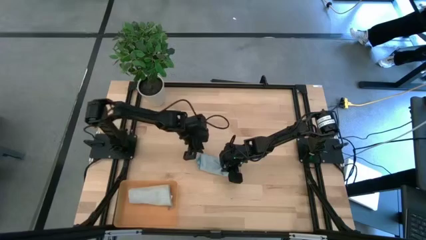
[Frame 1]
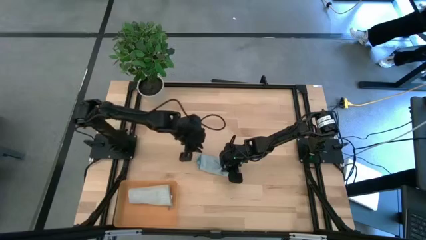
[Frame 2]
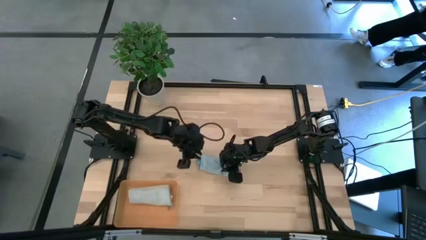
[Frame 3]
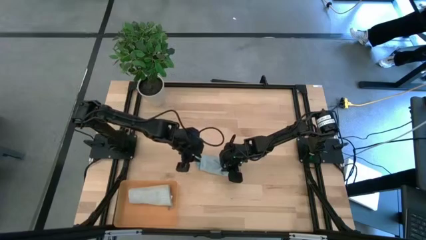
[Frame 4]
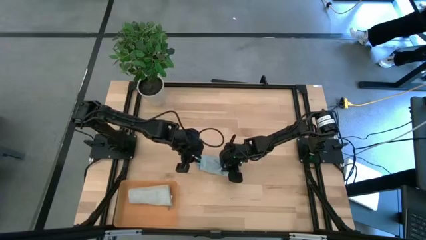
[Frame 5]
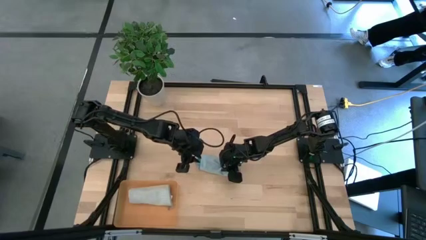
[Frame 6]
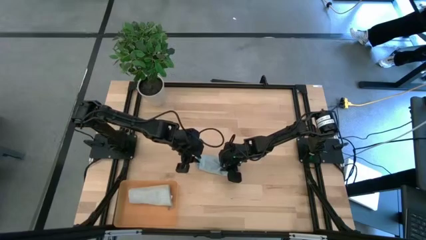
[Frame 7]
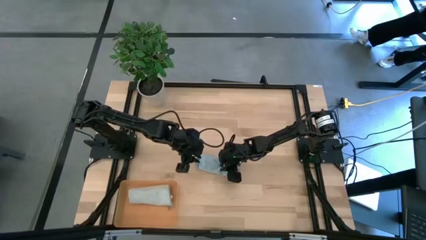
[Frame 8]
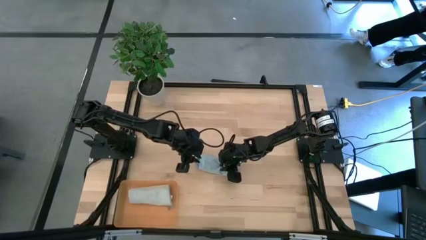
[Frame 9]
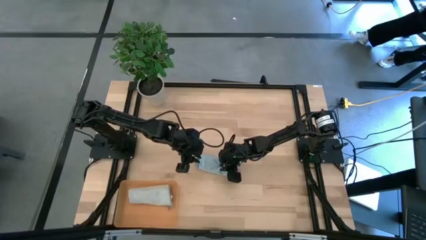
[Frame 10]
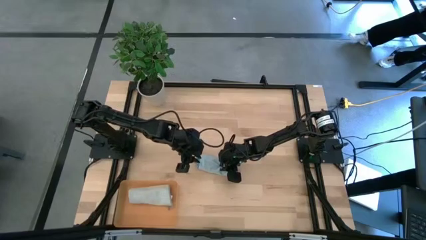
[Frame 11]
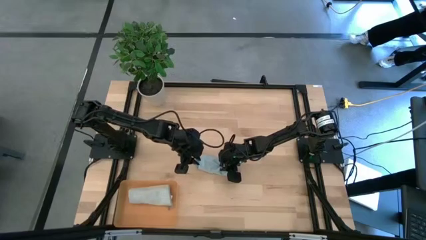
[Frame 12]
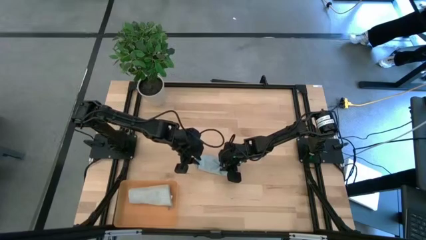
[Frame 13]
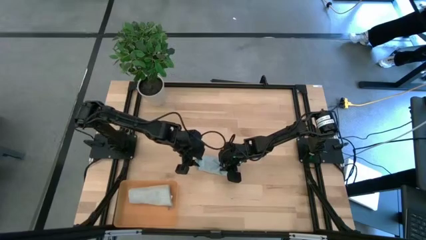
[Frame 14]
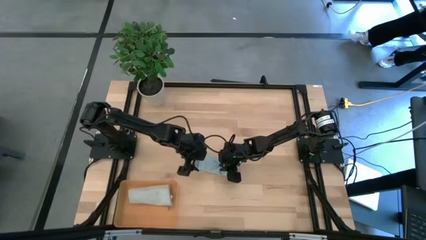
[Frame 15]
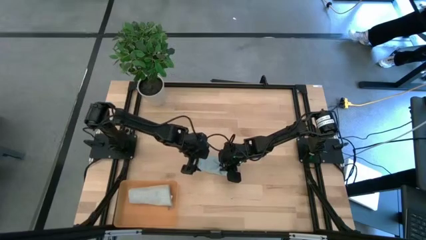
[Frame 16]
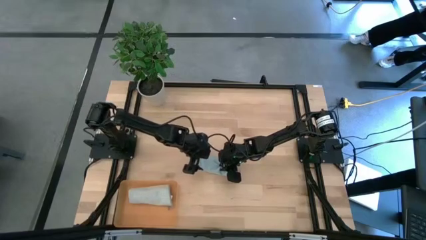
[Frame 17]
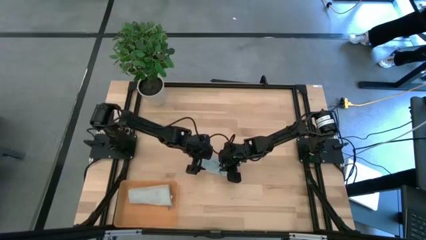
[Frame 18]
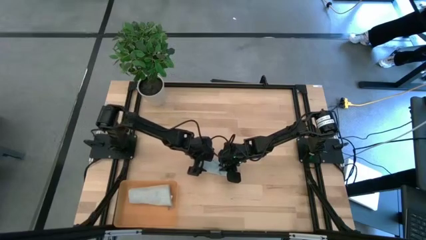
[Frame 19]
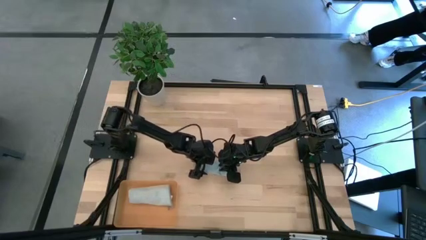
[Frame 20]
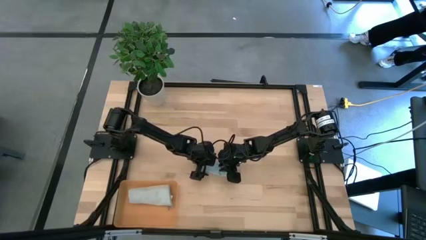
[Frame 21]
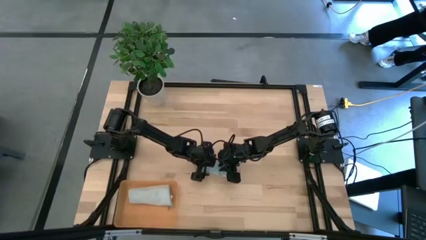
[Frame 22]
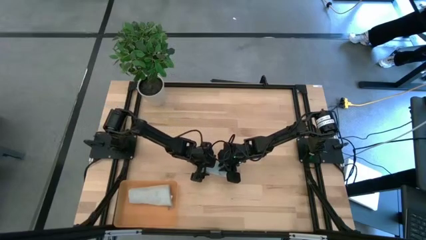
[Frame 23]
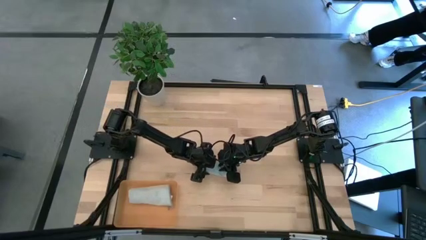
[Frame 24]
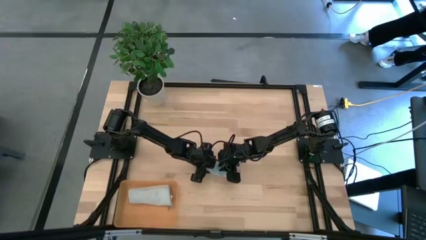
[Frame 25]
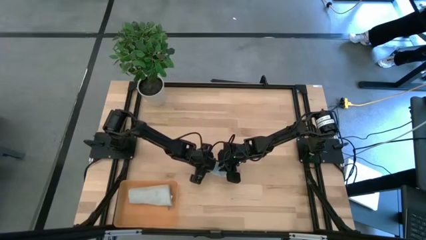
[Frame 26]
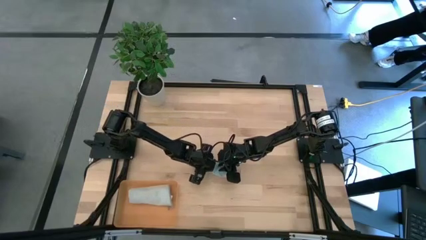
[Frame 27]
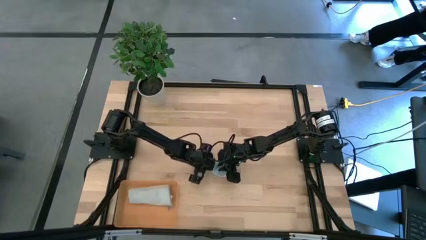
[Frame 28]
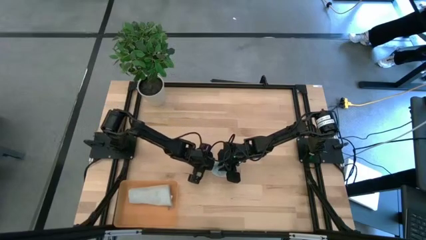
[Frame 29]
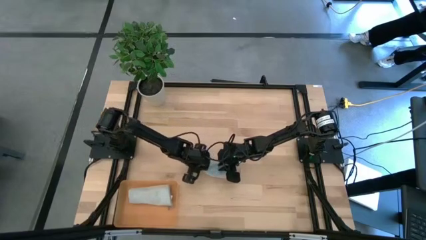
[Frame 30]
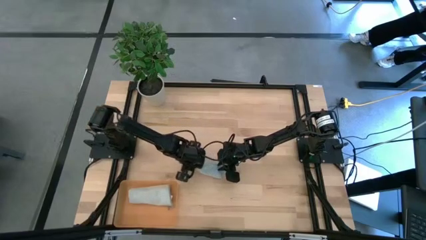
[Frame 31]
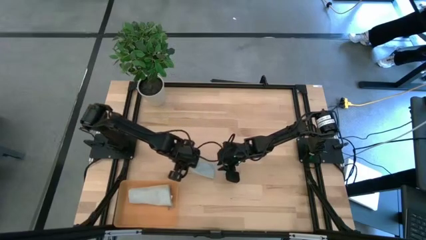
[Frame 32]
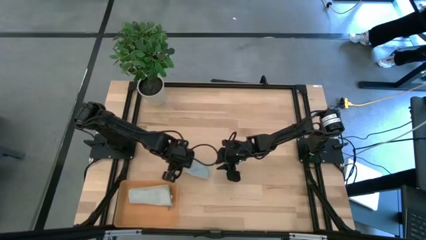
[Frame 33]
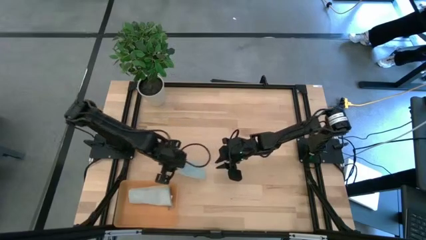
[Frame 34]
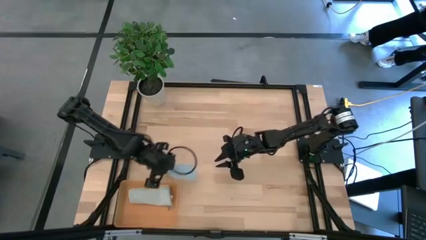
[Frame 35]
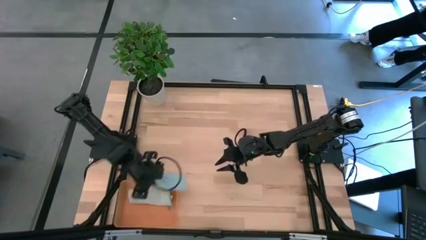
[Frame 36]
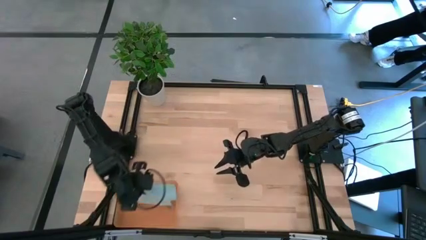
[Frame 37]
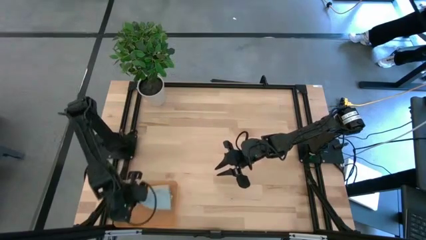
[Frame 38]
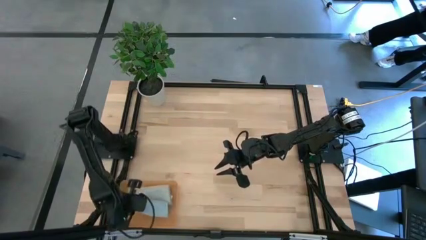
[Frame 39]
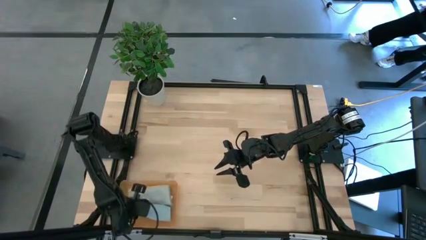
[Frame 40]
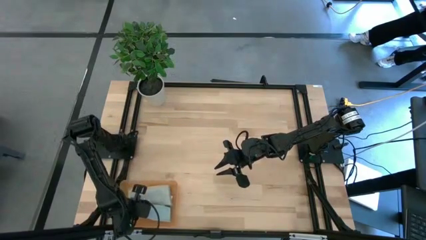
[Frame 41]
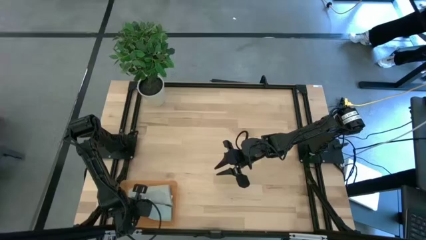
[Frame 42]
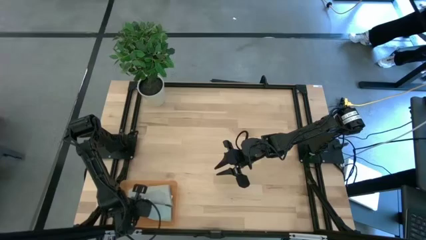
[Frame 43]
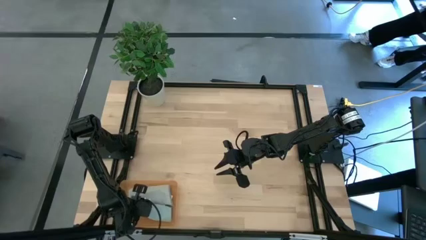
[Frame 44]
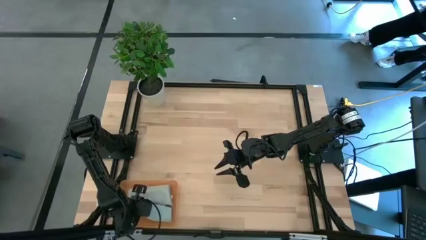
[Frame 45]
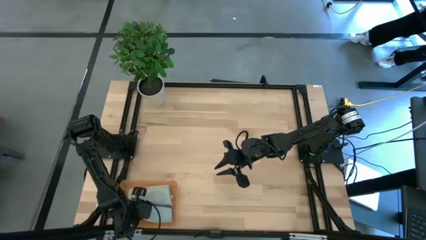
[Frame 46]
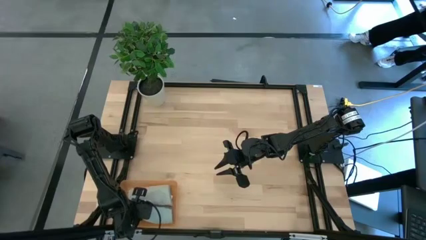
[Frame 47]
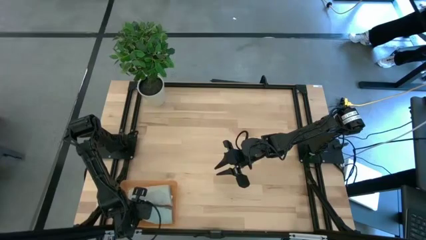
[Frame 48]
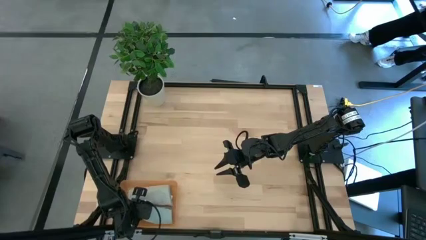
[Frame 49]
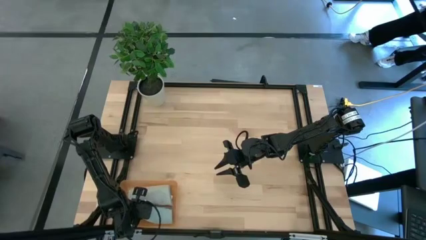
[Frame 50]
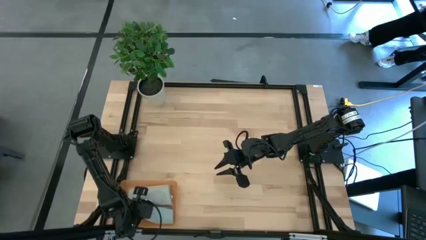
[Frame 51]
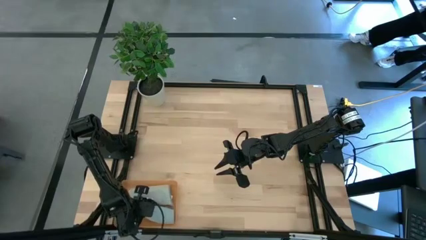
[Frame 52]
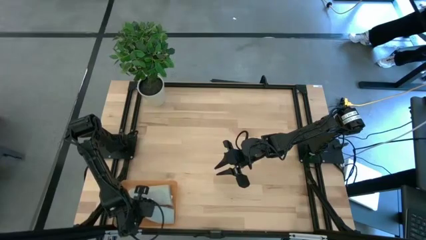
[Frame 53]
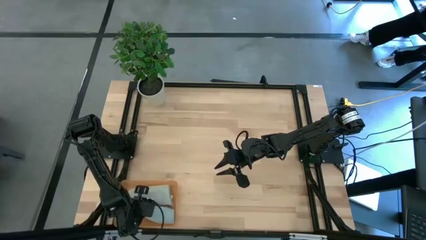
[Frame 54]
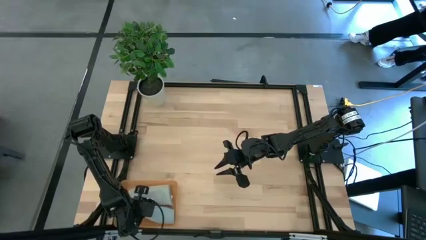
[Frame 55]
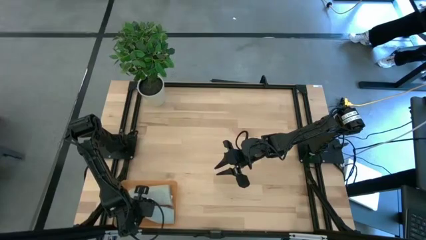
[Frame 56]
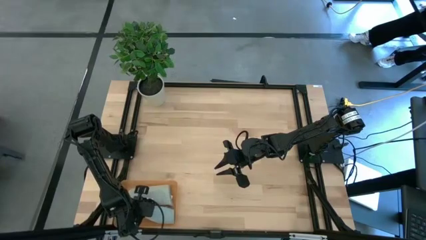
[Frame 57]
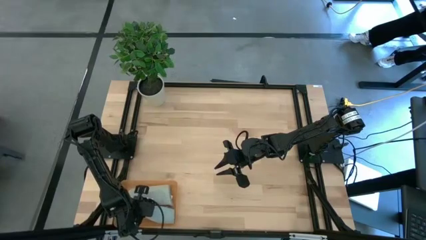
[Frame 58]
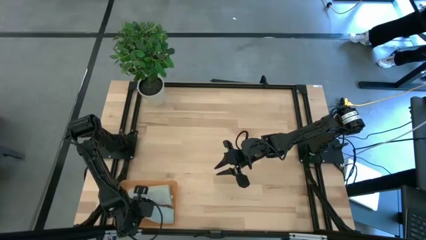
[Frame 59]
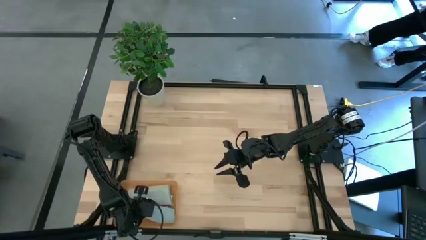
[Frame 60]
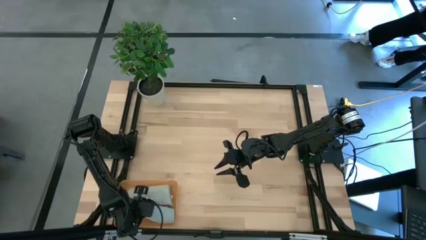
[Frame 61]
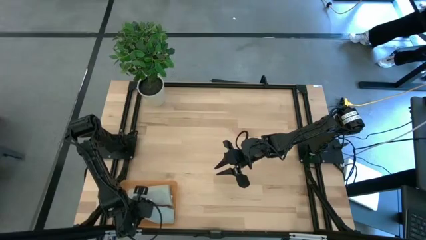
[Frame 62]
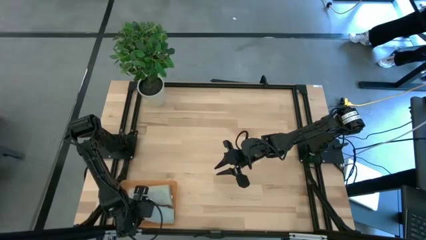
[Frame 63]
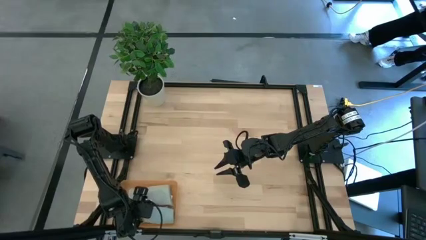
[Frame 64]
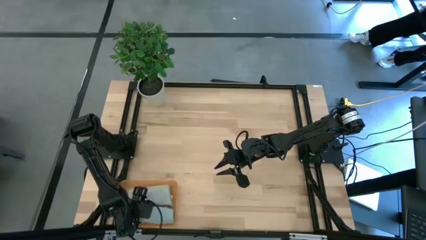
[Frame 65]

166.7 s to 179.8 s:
Task: Roll microfiber towels into tight, uniform cylinder then place into a basket
Put the rolled blue microfiber towel into the orange bin
